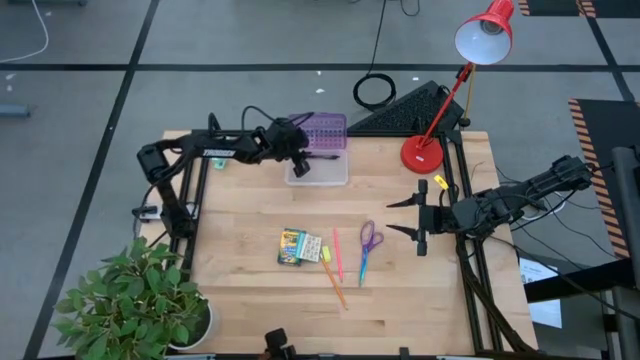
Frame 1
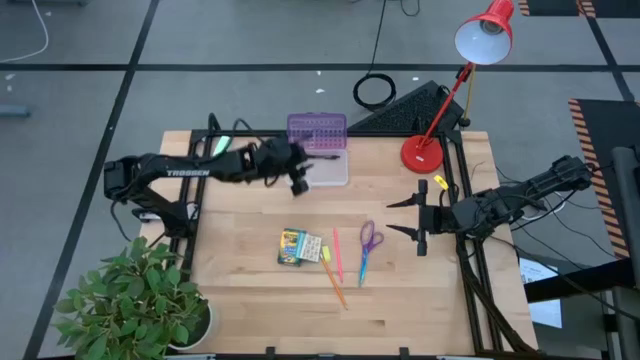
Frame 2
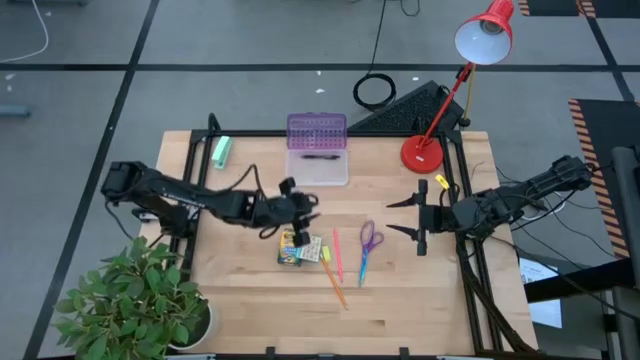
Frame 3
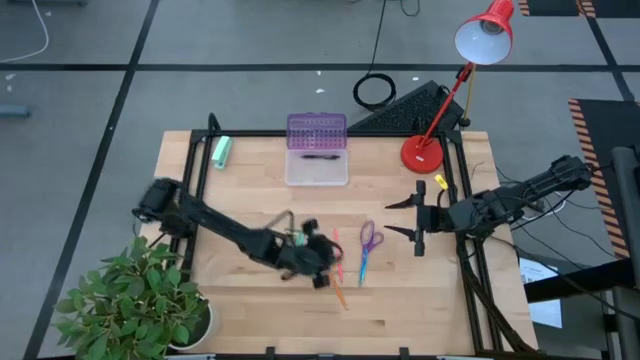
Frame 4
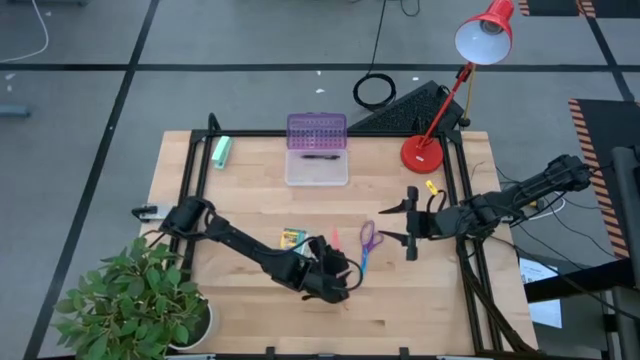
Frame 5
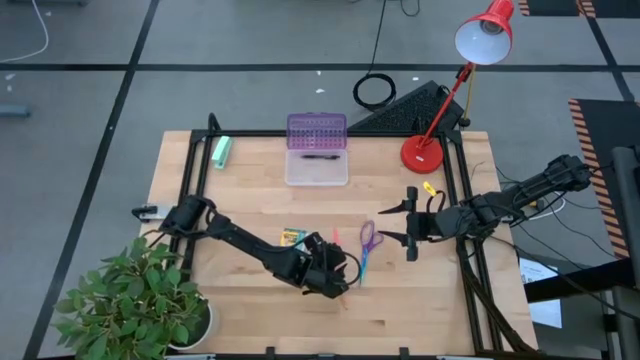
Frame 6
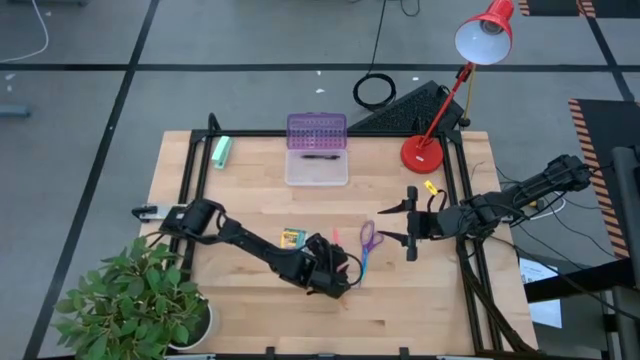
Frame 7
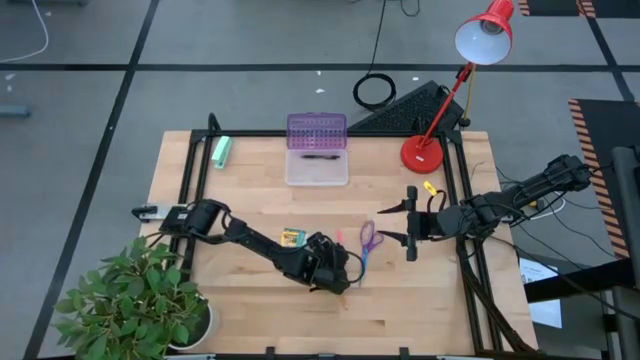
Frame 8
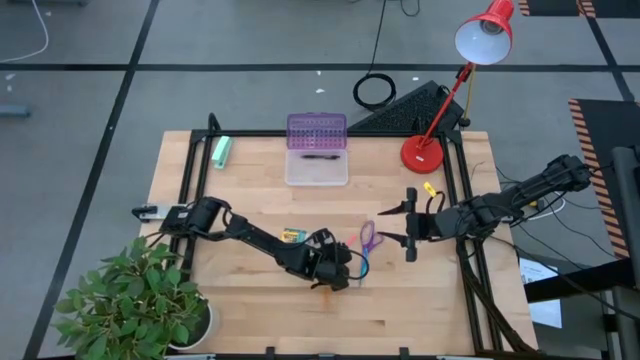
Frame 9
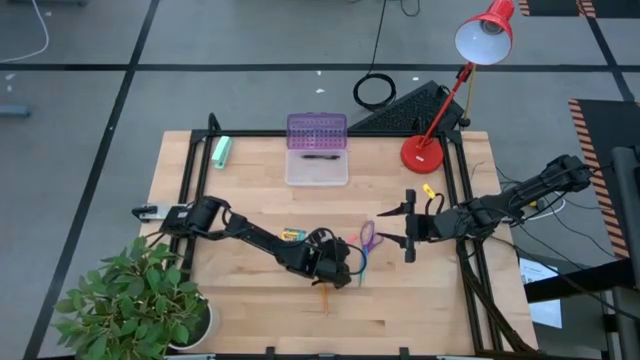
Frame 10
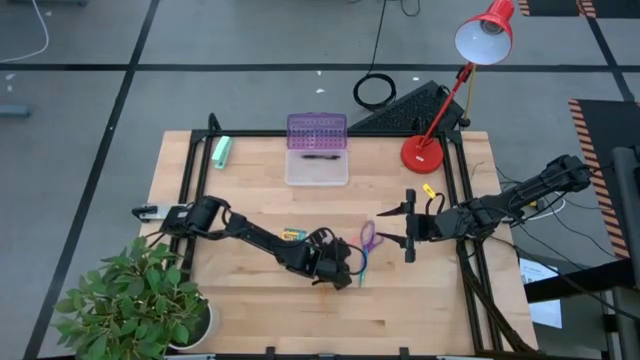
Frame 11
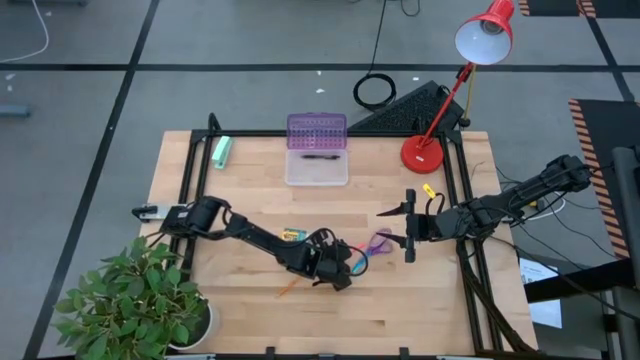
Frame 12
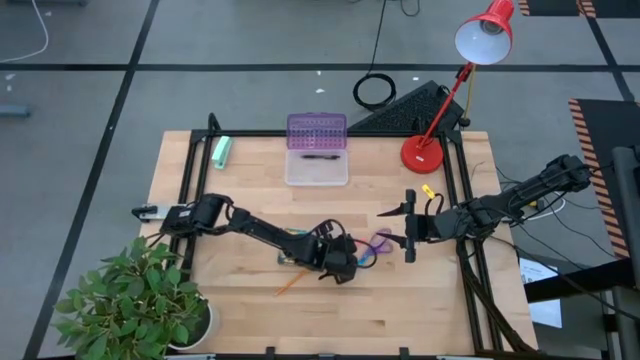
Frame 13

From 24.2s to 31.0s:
Task: Pack school essentials
Put the pink pencil into the purple supply box

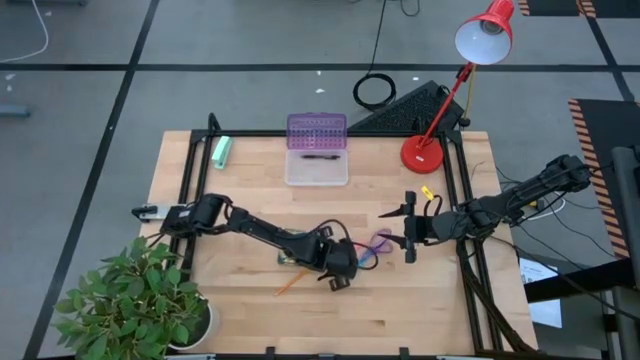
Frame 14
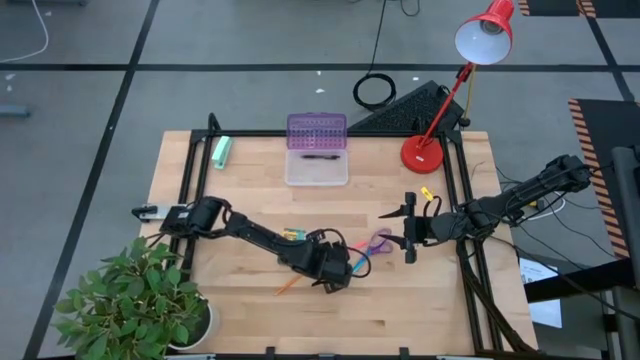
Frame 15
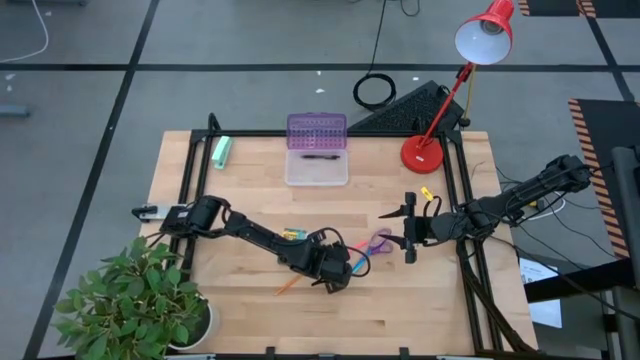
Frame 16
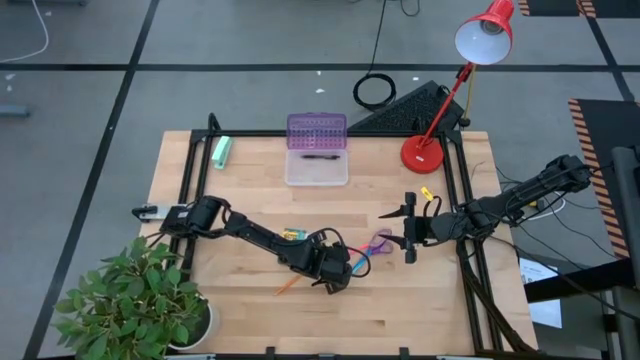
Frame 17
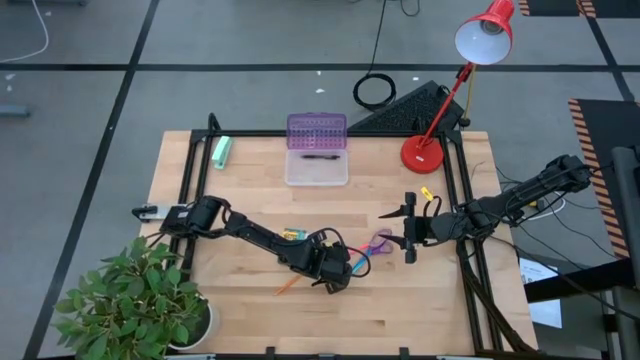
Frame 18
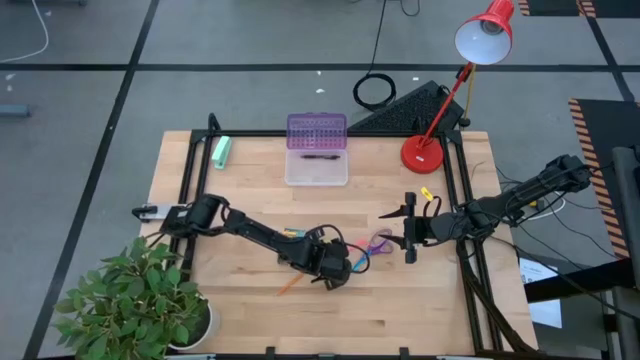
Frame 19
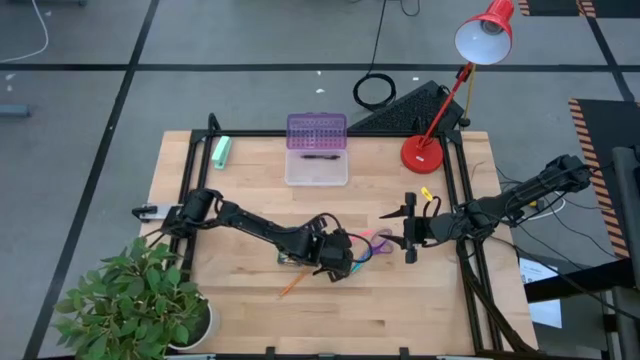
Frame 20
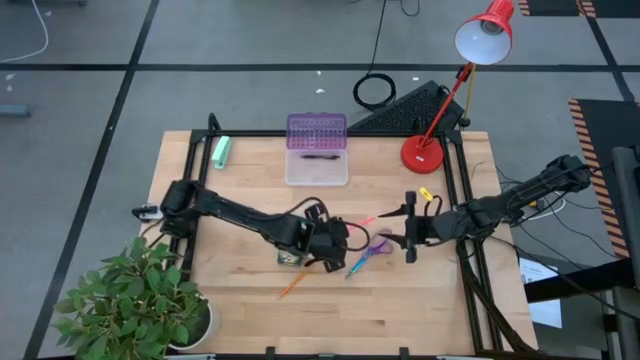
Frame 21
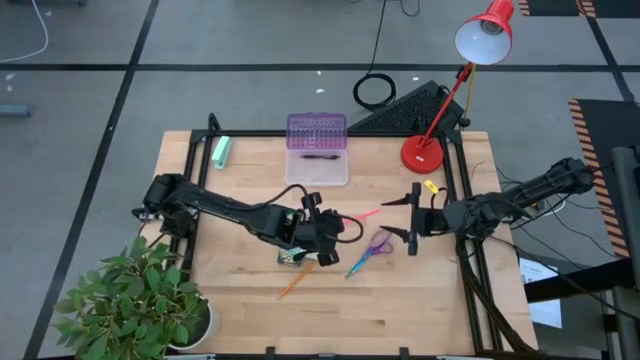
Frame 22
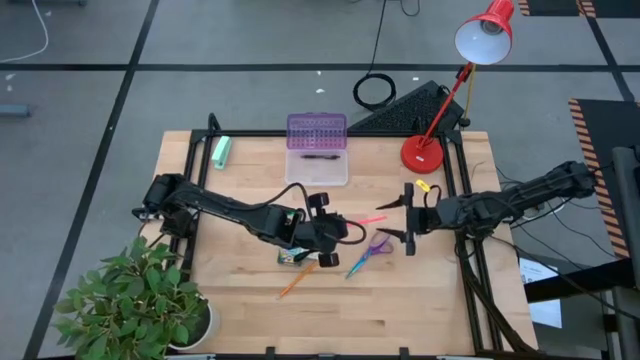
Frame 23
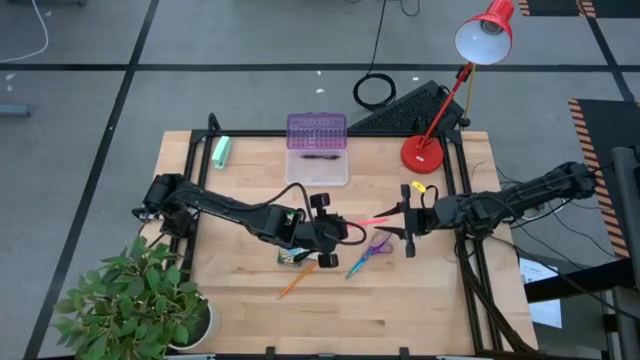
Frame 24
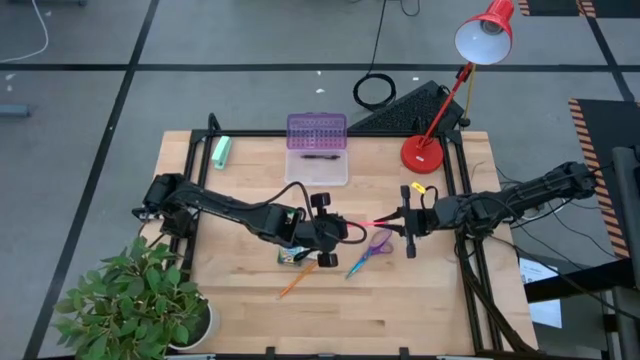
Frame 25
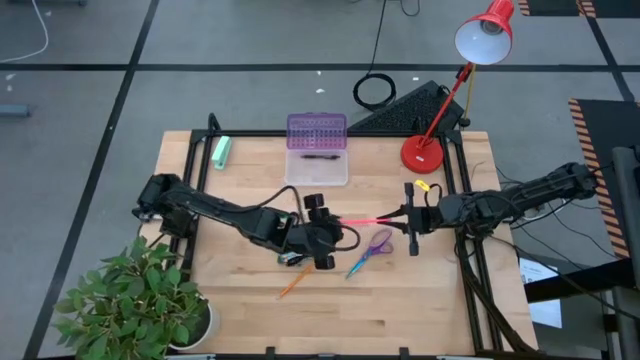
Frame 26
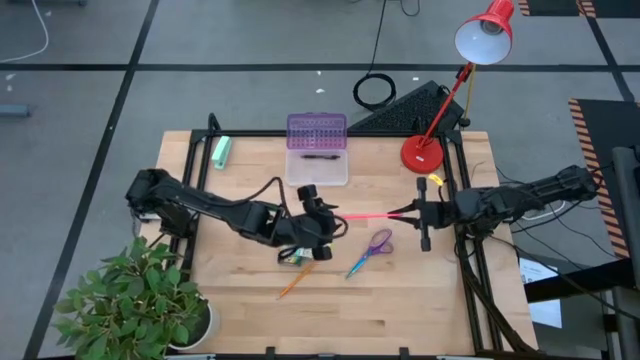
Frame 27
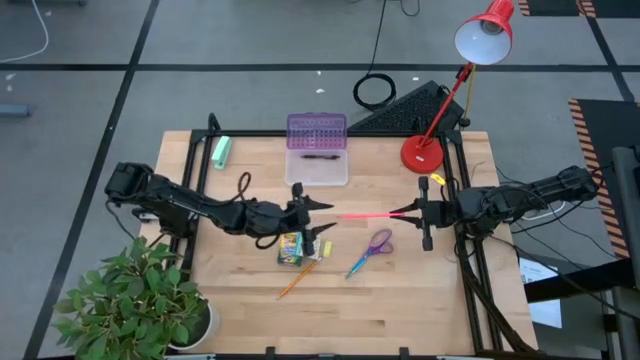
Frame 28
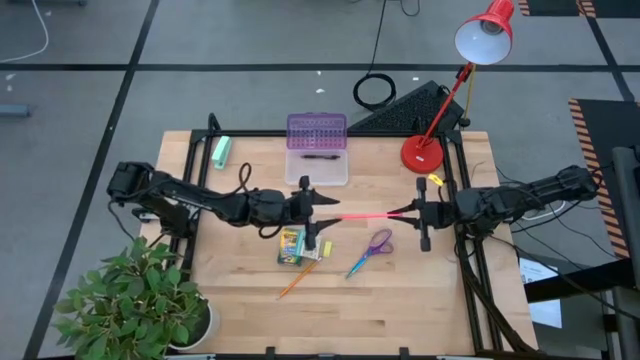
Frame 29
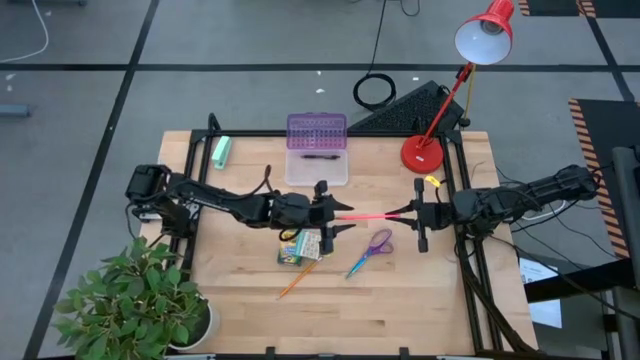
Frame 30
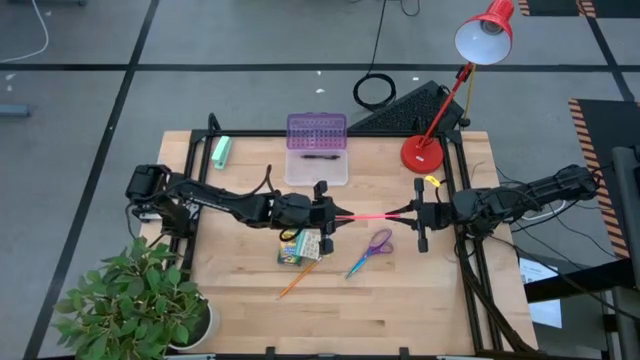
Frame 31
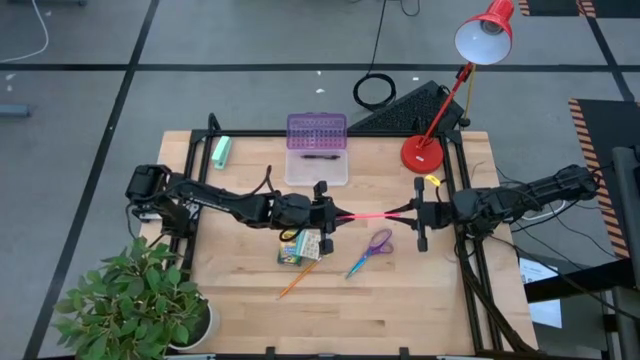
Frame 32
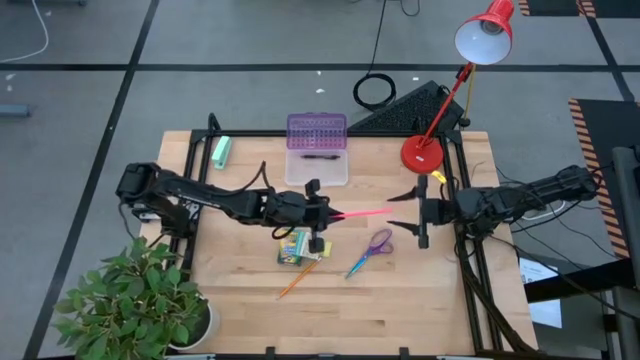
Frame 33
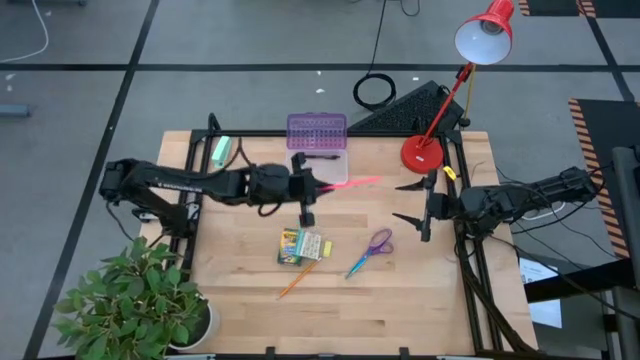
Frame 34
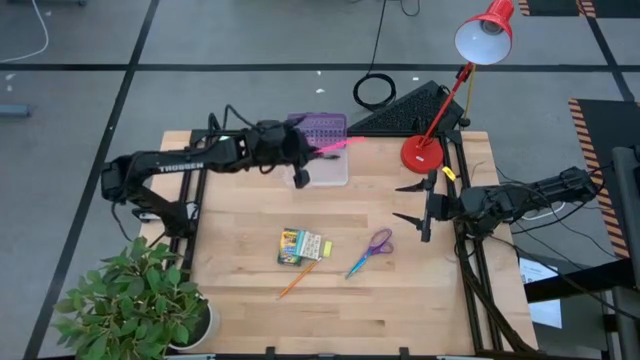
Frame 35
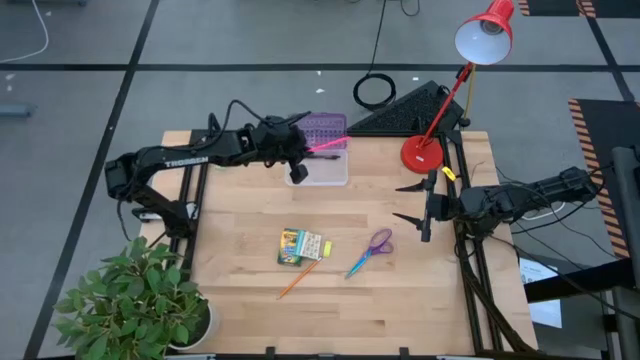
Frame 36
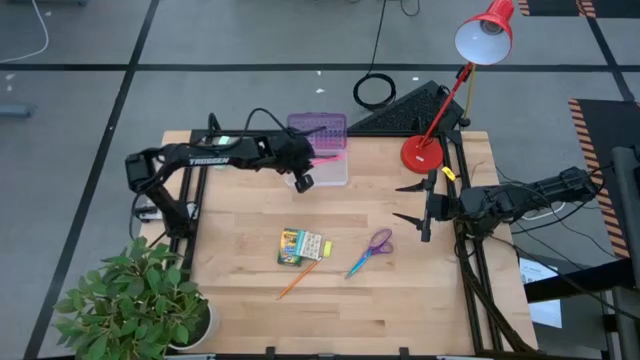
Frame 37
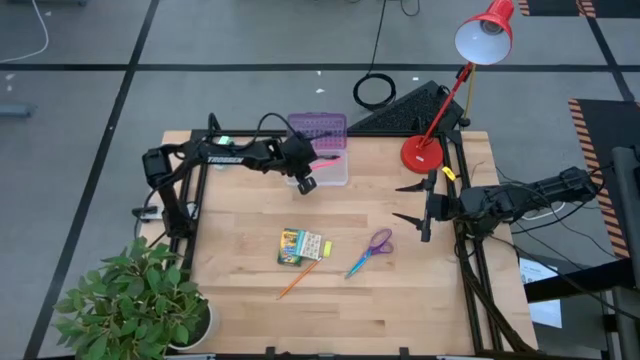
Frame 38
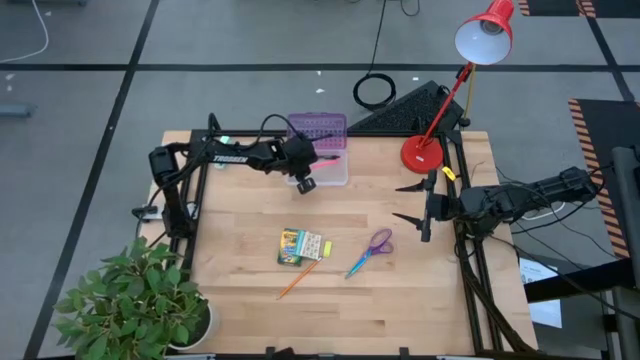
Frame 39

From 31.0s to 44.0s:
Put the pink pencil into the purple supply box

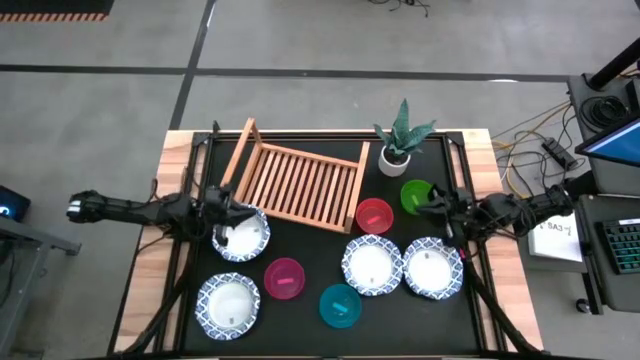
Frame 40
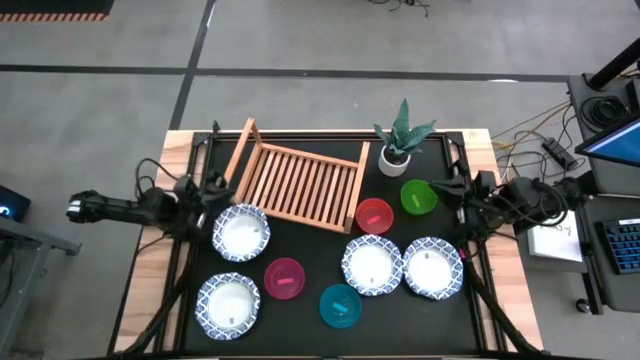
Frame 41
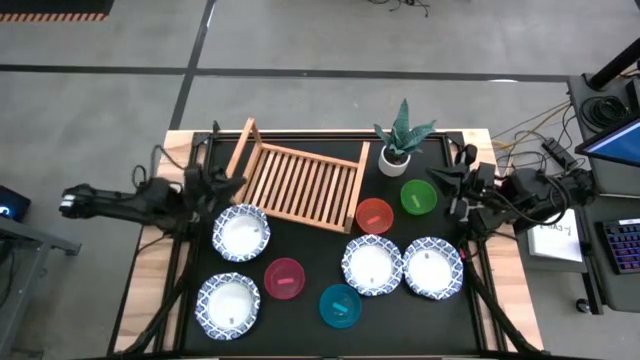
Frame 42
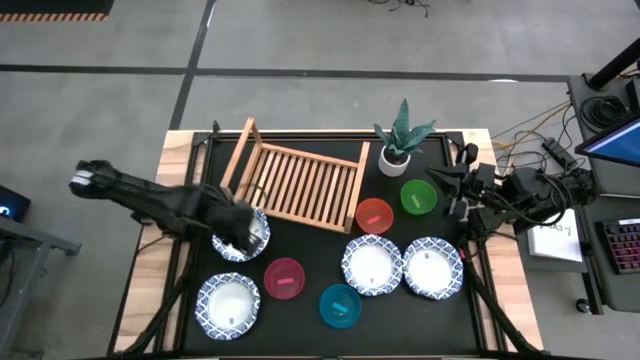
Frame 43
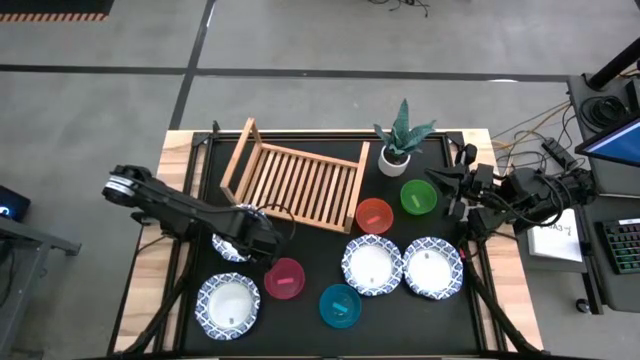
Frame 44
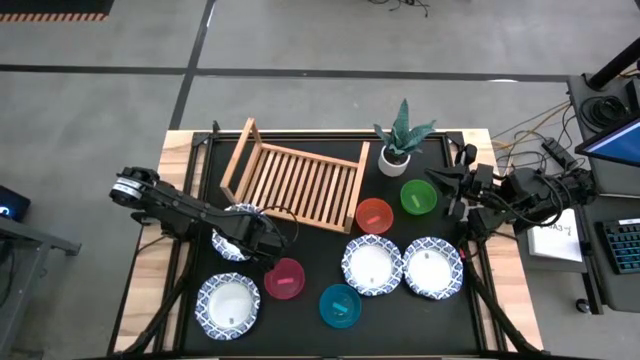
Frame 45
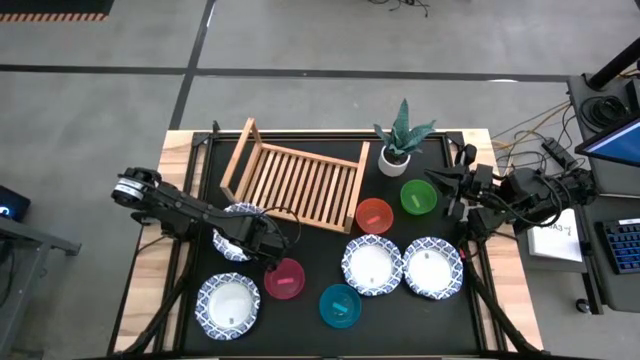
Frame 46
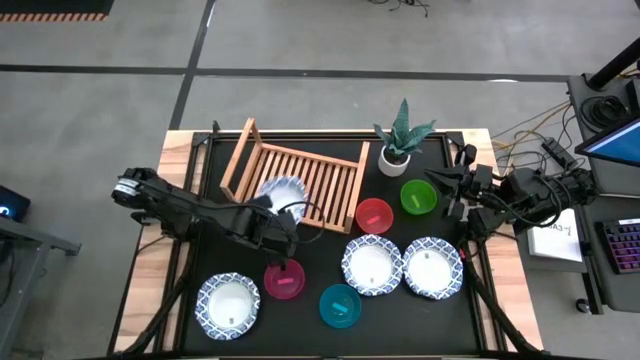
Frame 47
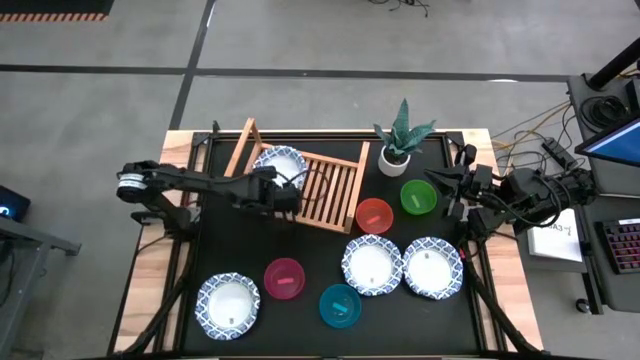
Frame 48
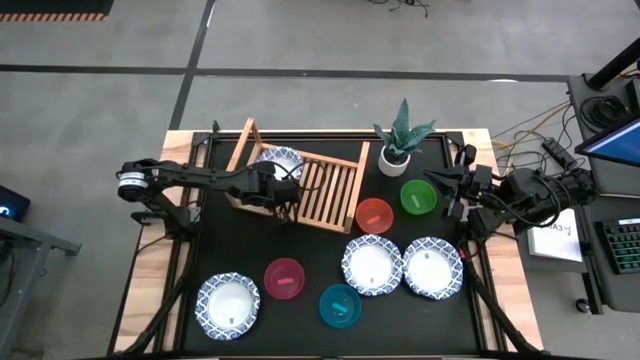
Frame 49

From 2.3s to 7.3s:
Task: Place and stack bowls onto a shelf
Put the white patterned bowl on the shelf
